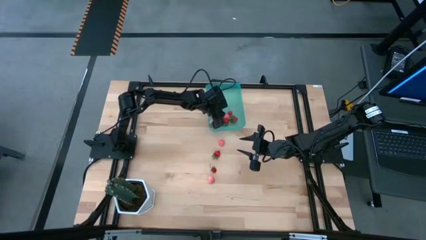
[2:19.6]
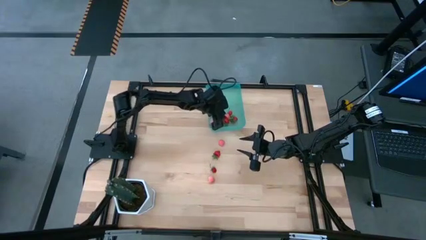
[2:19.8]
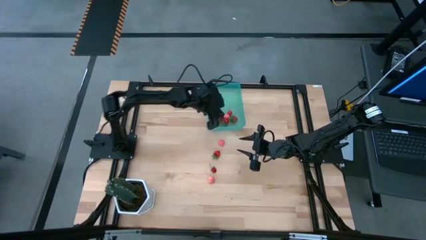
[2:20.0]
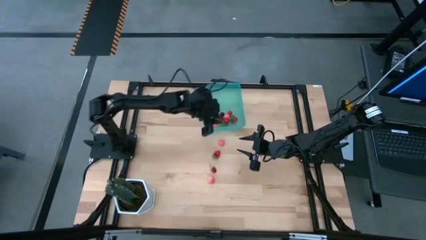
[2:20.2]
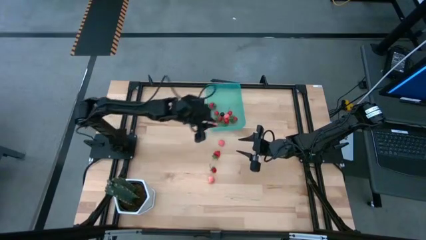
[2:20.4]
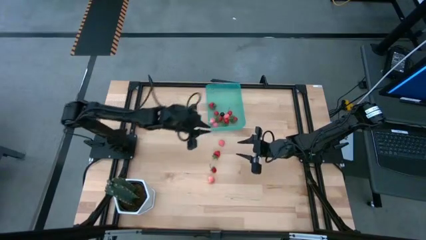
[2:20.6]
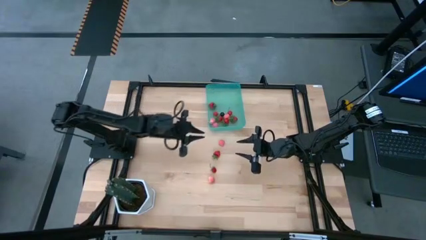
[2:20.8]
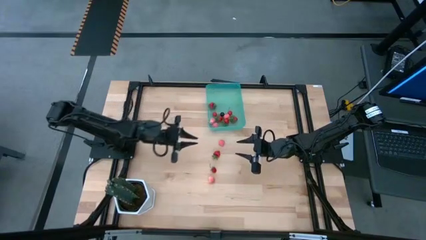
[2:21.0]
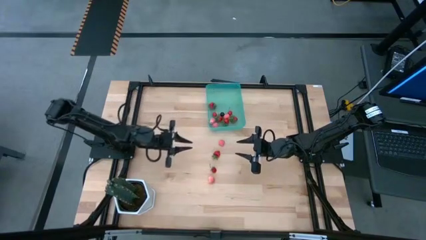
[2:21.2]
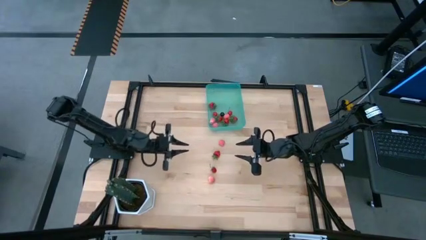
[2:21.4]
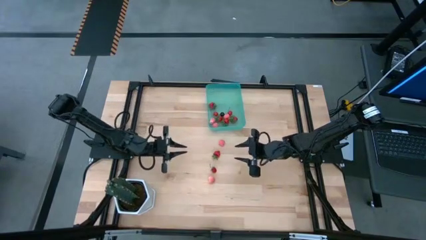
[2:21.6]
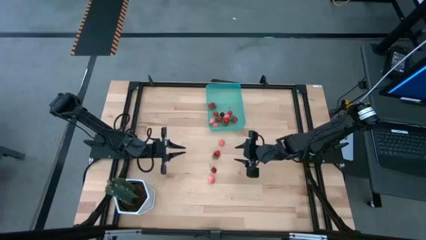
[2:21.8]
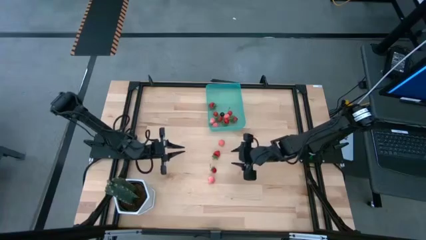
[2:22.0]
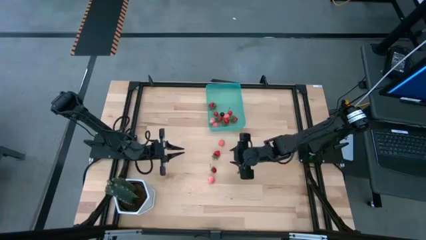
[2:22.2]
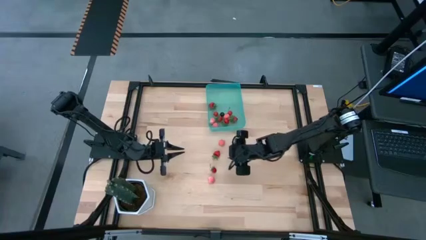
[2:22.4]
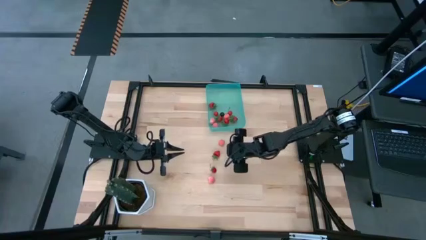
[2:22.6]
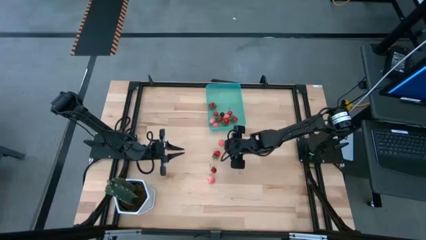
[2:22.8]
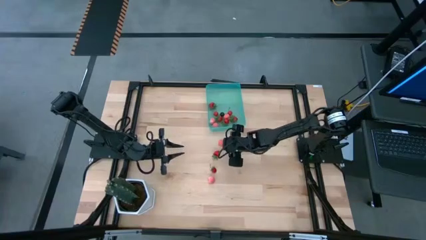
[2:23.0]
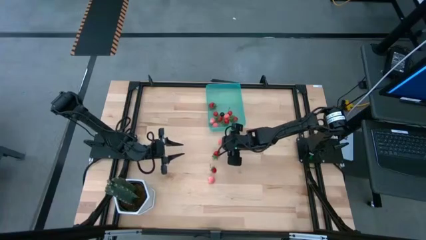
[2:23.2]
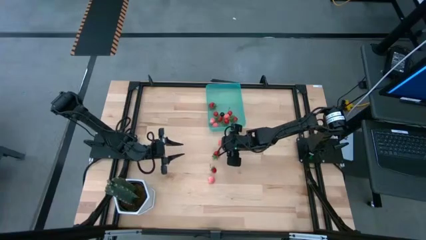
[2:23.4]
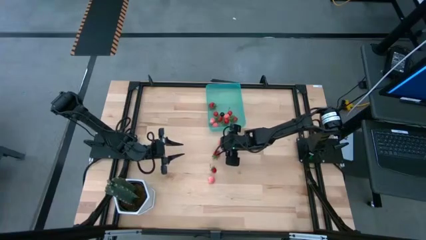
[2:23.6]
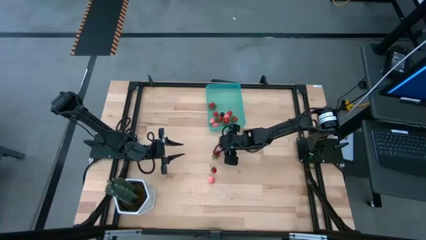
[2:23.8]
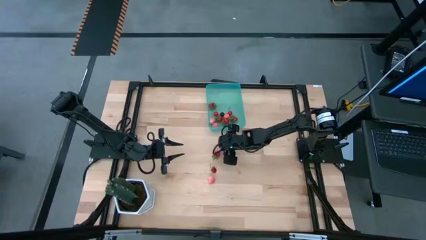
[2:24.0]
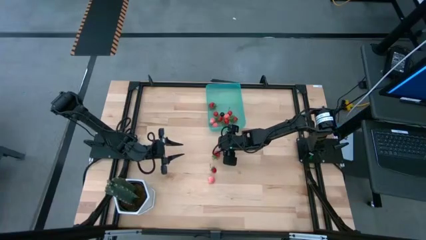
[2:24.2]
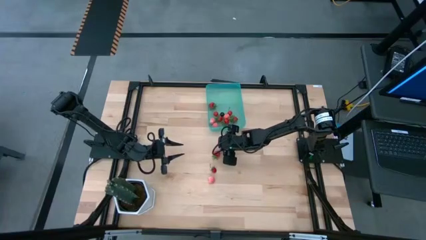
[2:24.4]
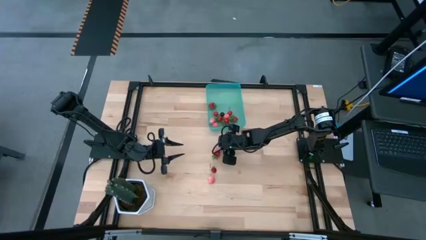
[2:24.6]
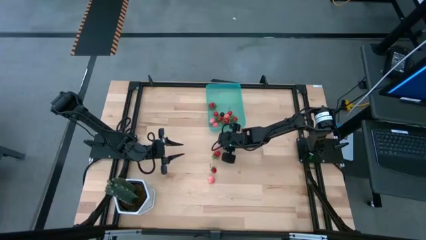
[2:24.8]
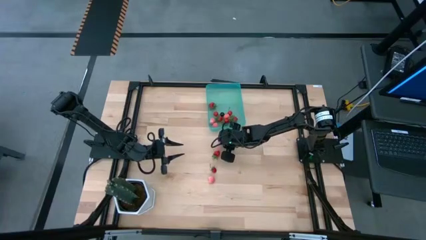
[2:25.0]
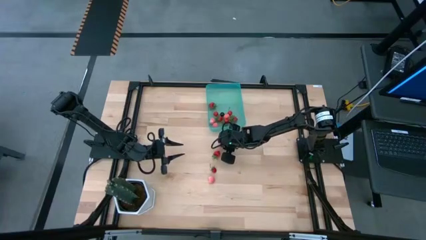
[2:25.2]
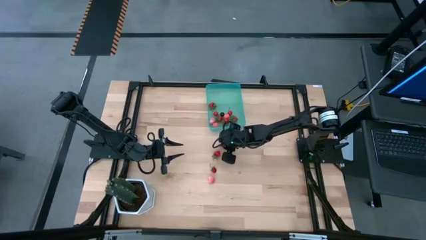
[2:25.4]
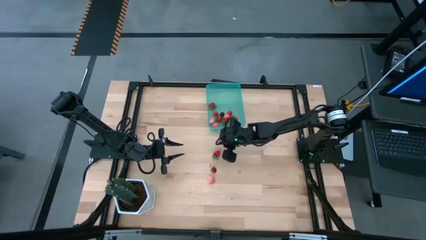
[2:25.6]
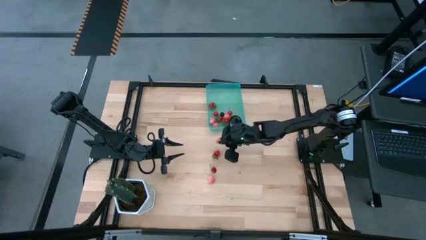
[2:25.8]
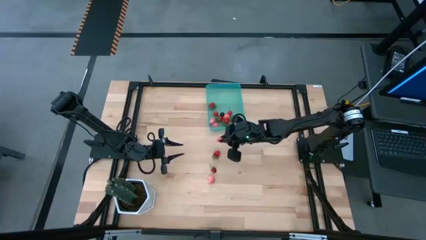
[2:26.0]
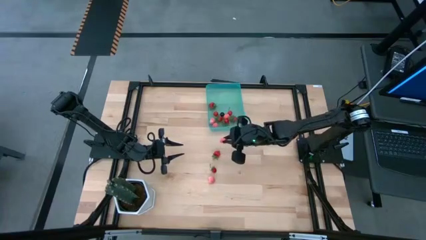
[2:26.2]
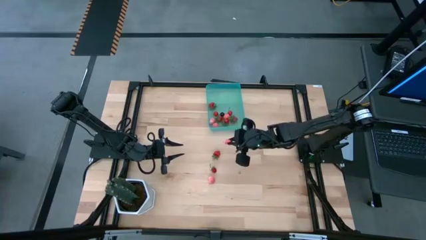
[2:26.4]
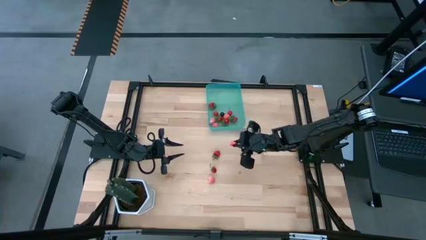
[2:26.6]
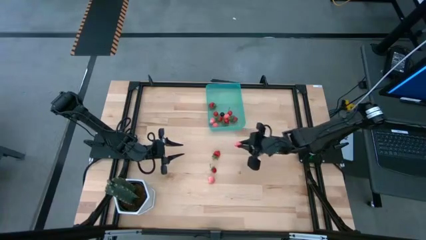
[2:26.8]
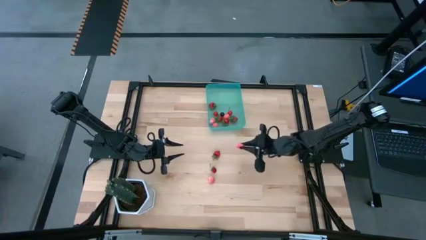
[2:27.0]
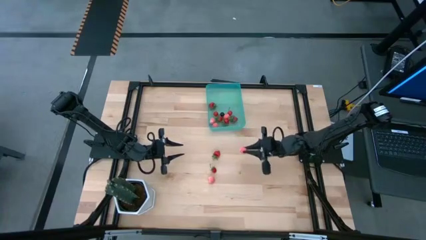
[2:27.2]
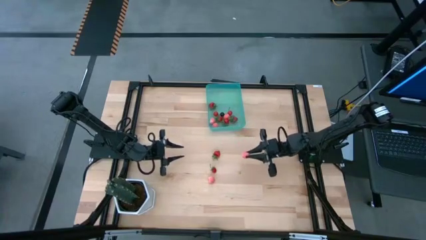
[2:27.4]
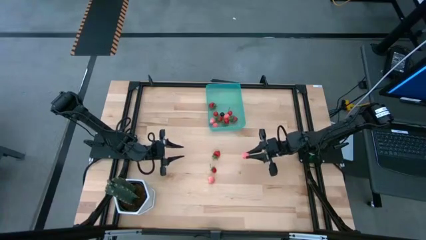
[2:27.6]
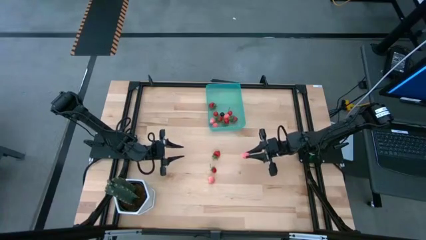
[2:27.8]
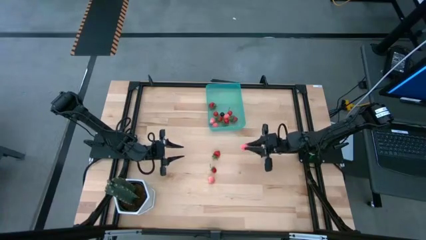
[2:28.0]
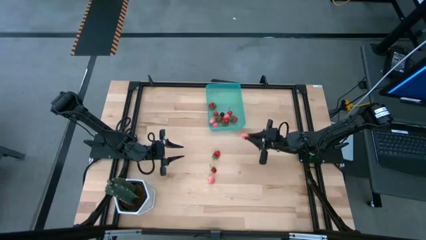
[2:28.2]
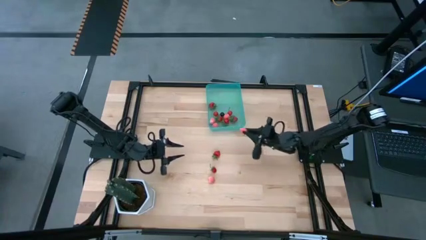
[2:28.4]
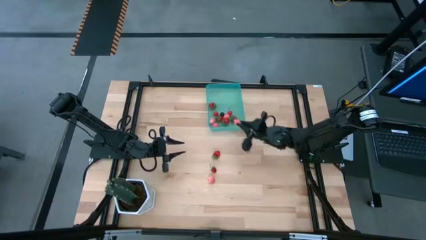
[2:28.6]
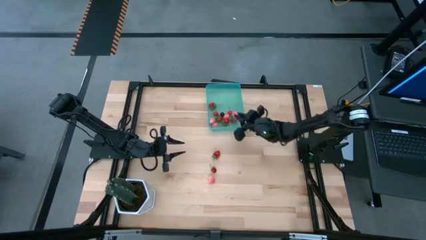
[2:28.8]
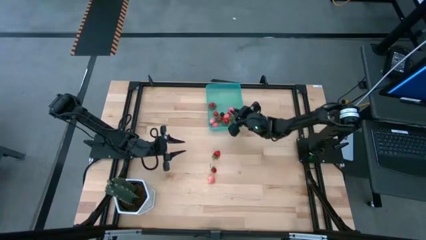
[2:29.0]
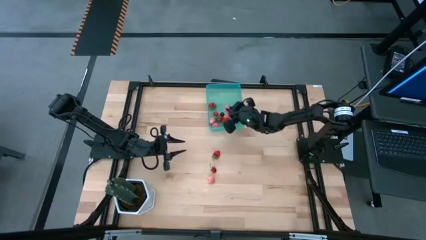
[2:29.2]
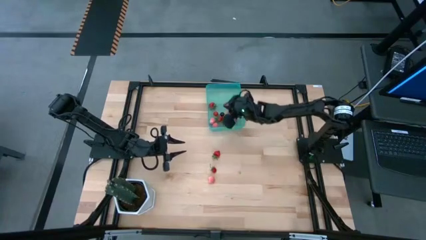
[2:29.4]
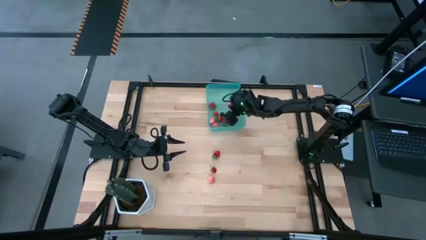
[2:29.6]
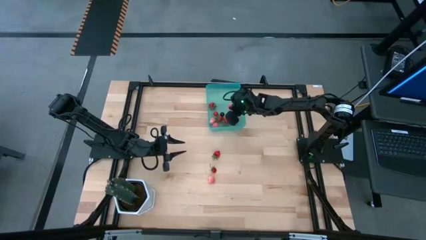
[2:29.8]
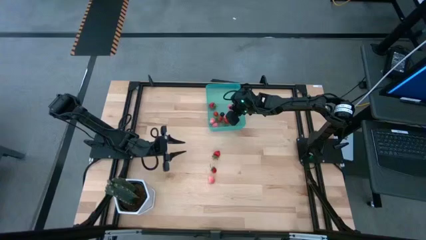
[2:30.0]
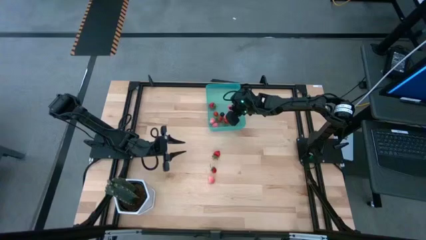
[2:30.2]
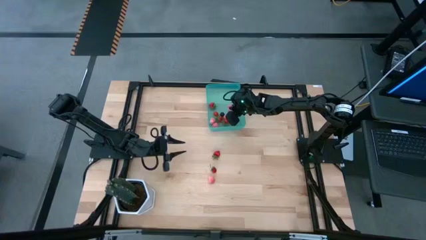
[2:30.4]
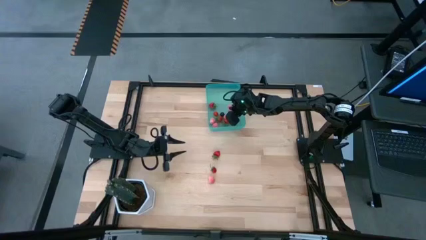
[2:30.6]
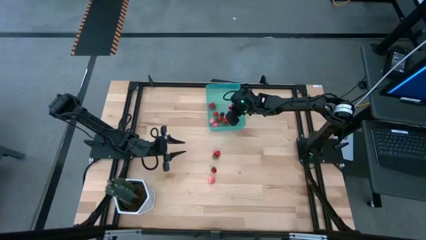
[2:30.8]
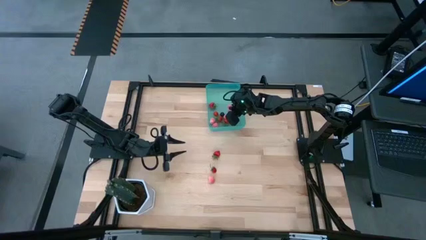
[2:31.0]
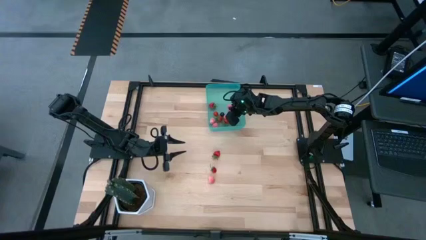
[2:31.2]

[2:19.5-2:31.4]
Task: Pick and placing Produce into tupperware
Put the pink peach into the blue bin

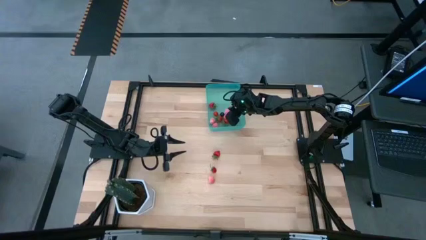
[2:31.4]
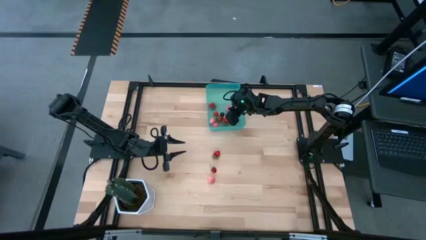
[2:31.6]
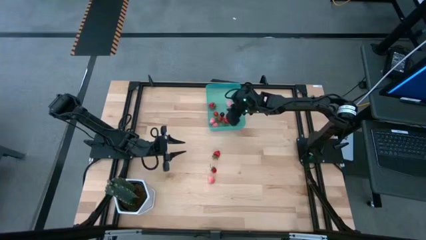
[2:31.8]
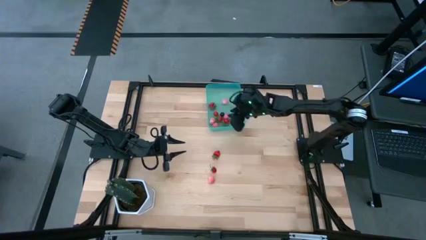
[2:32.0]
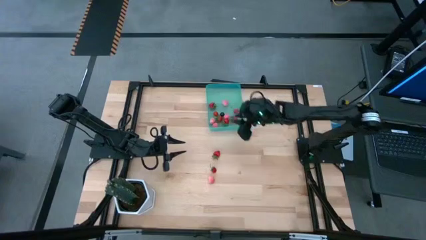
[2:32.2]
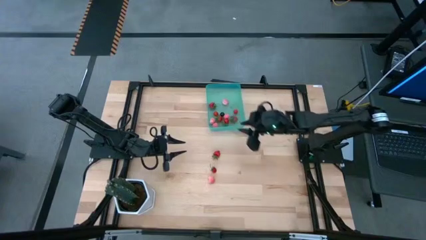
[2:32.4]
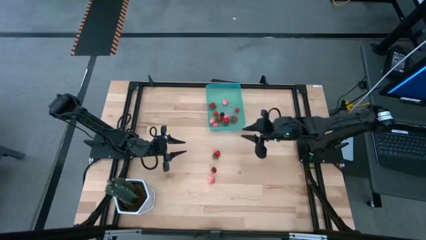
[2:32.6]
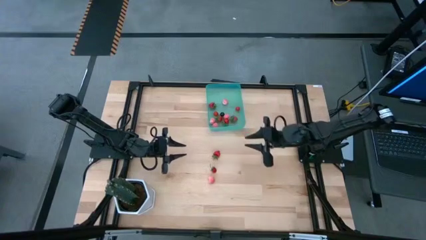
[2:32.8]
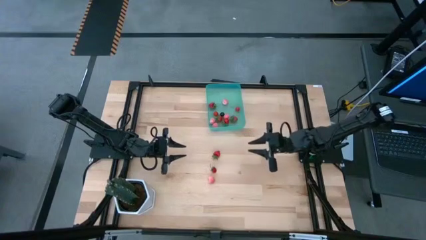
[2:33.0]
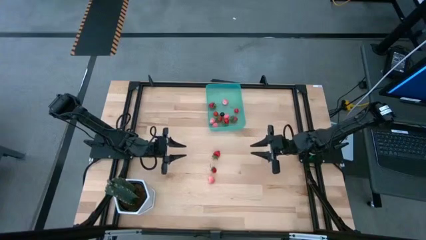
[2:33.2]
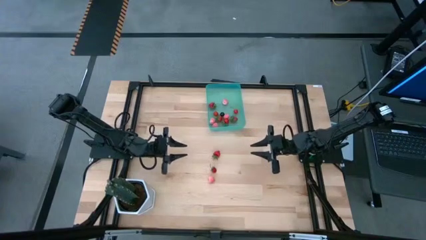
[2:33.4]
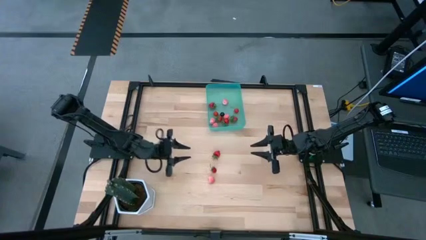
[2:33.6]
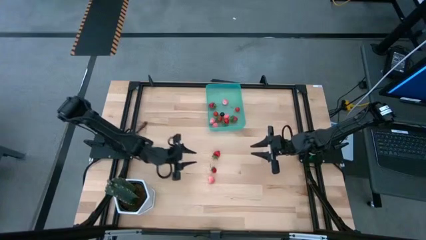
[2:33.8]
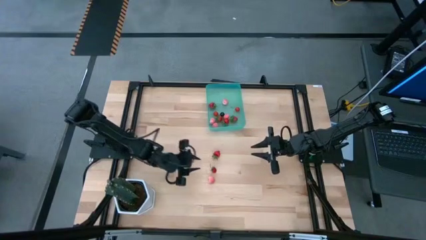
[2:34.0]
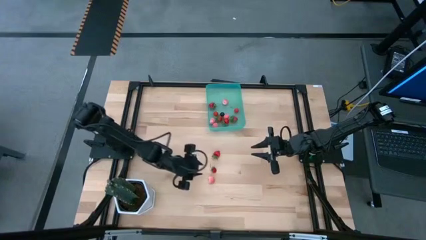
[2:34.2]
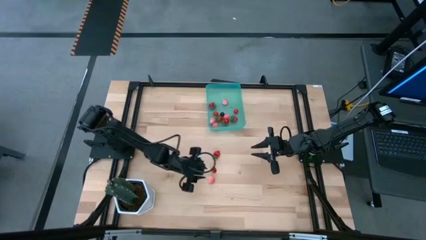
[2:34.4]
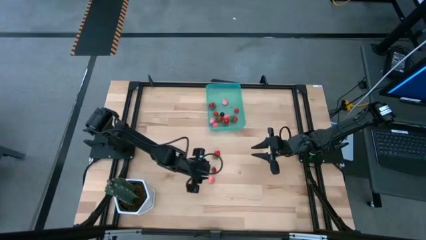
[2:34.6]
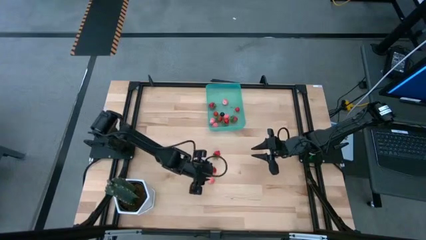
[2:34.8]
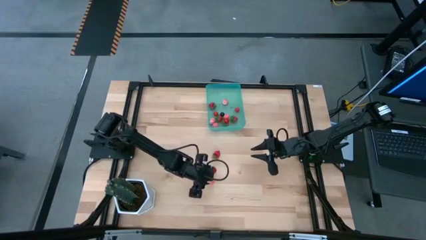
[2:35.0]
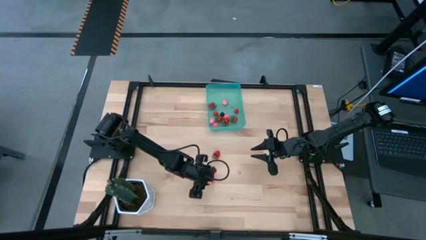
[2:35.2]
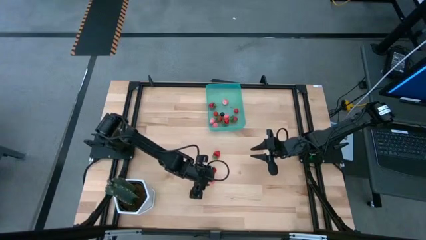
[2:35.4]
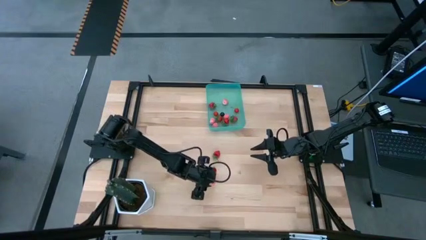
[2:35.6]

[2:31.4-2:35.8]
Put the pink peach into the blue bin
